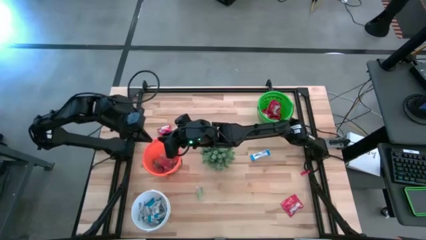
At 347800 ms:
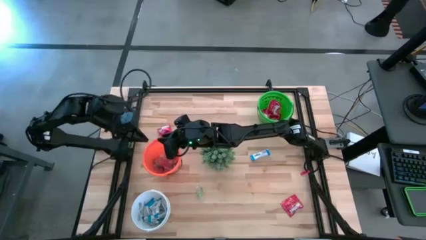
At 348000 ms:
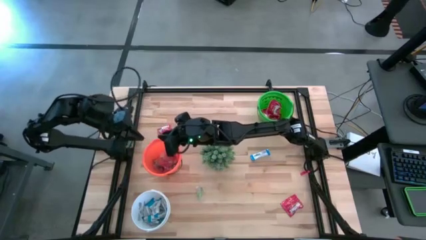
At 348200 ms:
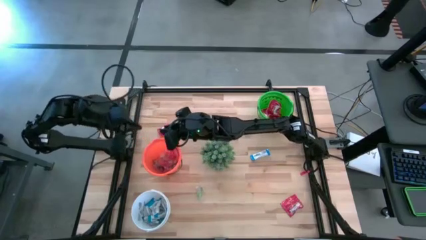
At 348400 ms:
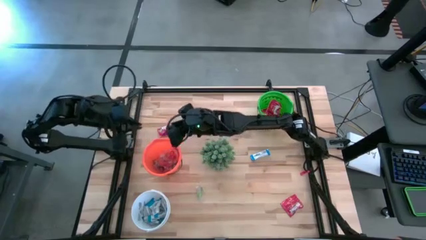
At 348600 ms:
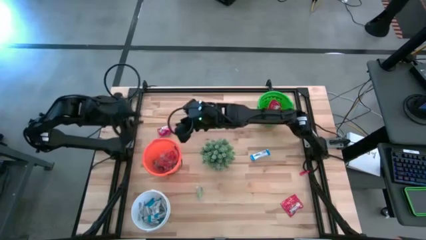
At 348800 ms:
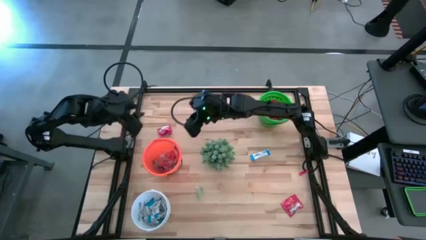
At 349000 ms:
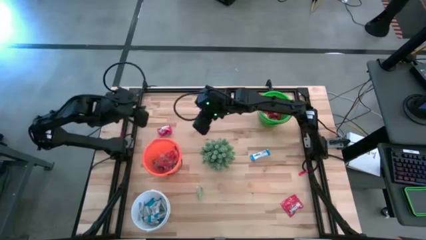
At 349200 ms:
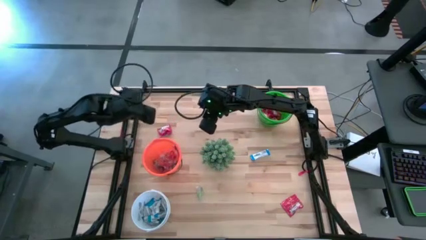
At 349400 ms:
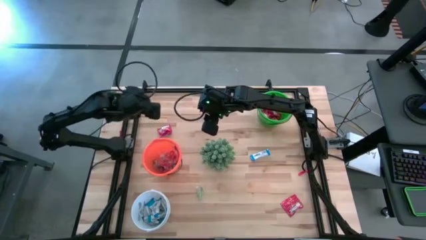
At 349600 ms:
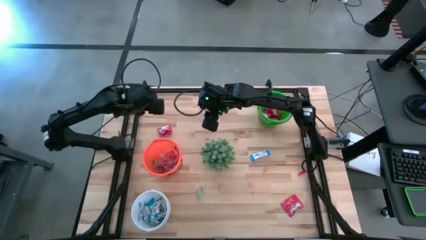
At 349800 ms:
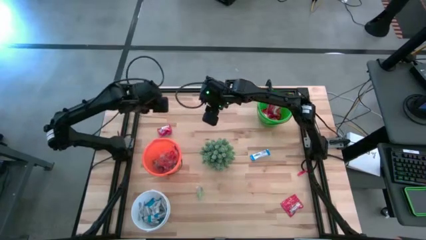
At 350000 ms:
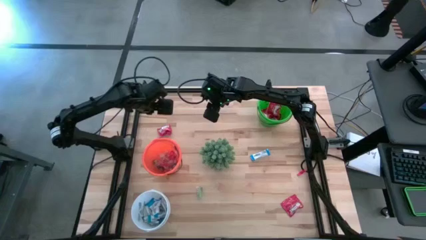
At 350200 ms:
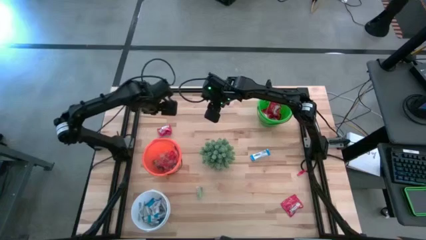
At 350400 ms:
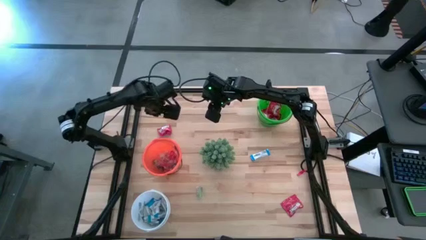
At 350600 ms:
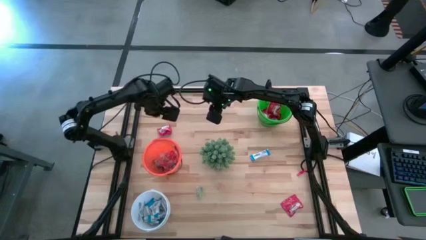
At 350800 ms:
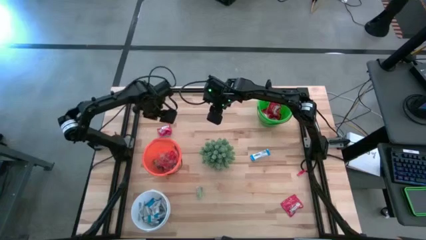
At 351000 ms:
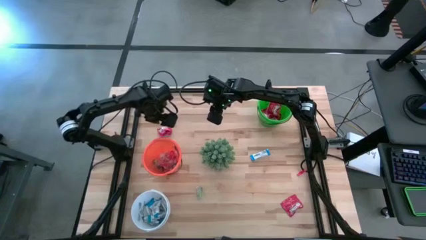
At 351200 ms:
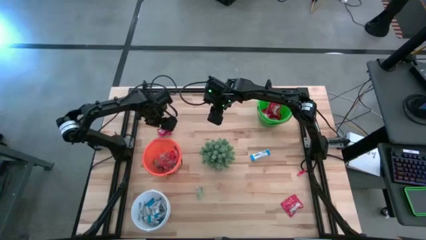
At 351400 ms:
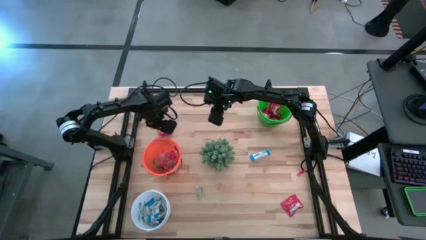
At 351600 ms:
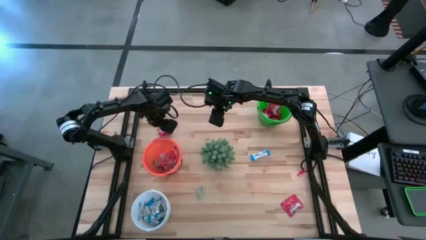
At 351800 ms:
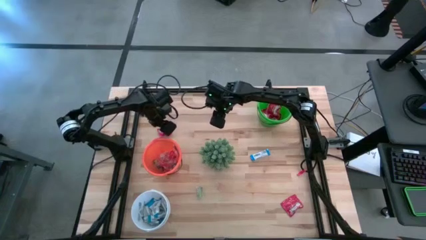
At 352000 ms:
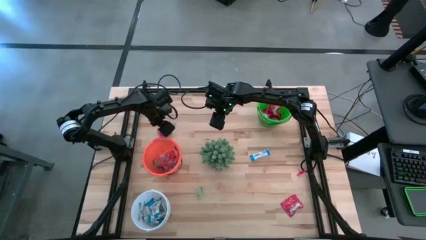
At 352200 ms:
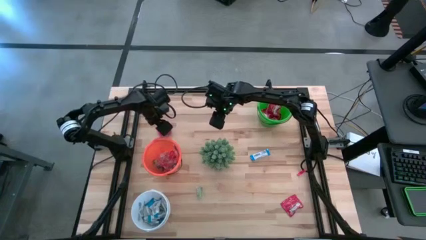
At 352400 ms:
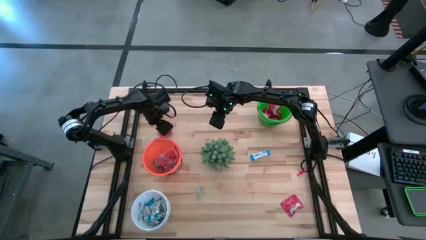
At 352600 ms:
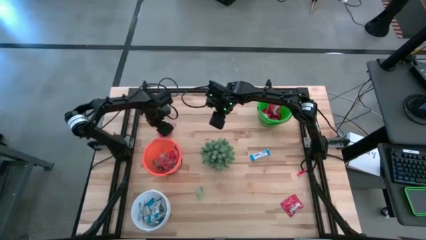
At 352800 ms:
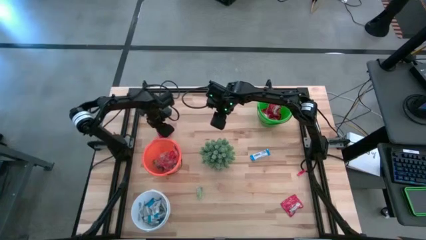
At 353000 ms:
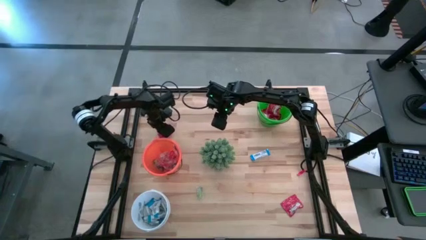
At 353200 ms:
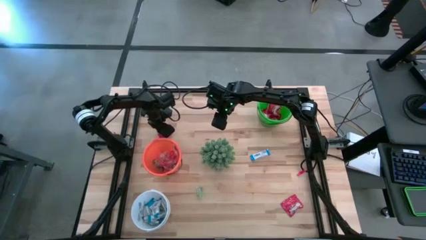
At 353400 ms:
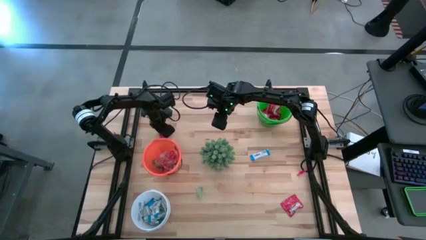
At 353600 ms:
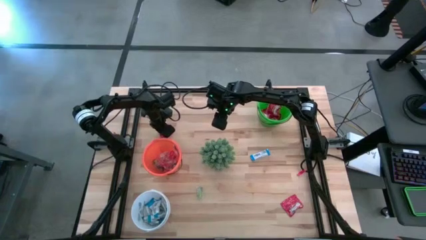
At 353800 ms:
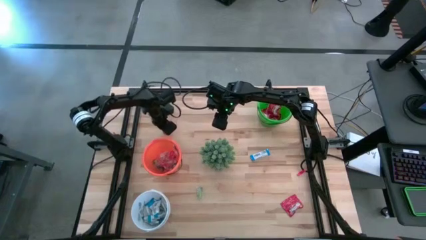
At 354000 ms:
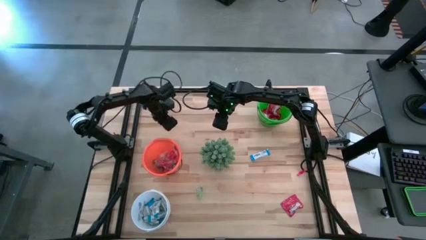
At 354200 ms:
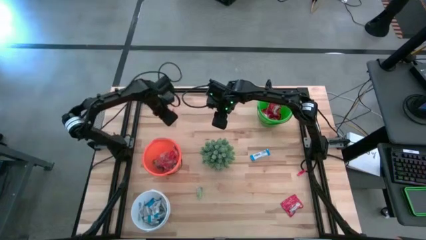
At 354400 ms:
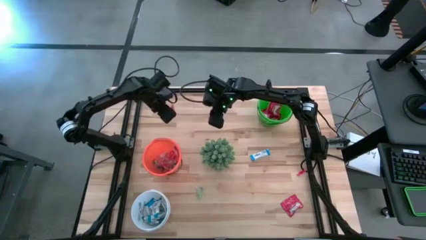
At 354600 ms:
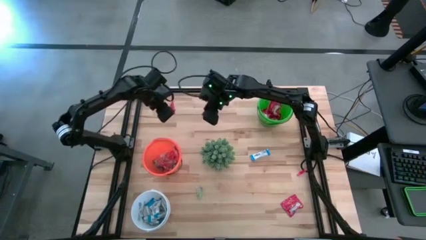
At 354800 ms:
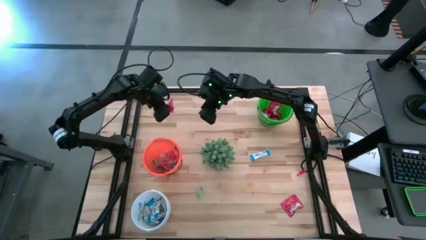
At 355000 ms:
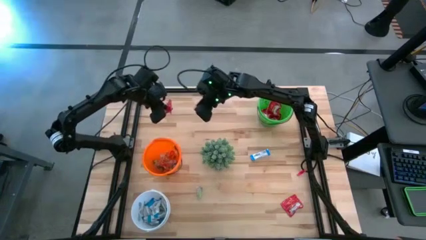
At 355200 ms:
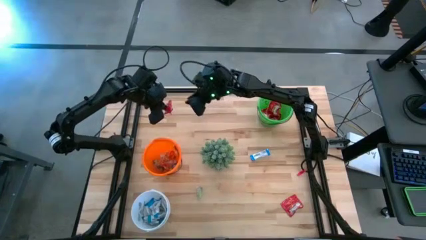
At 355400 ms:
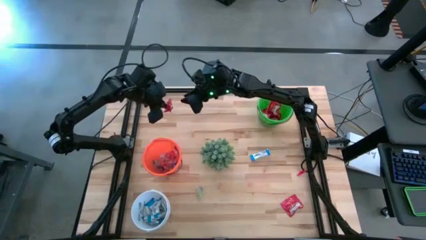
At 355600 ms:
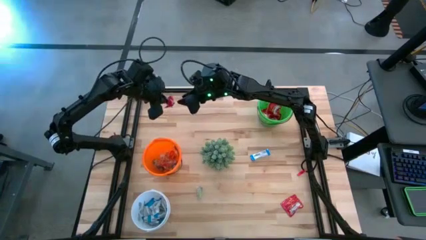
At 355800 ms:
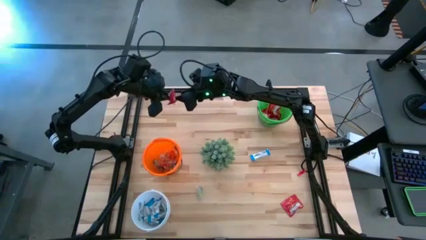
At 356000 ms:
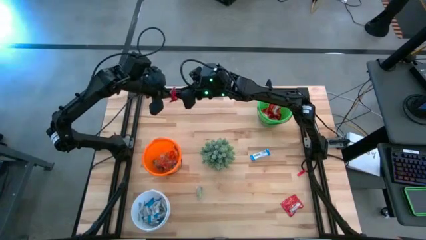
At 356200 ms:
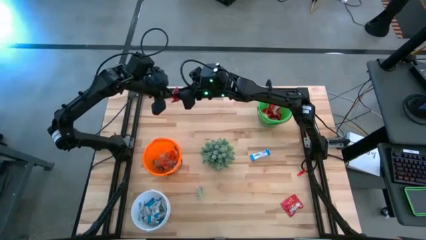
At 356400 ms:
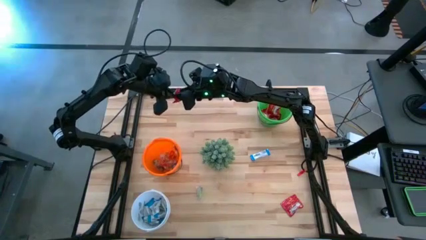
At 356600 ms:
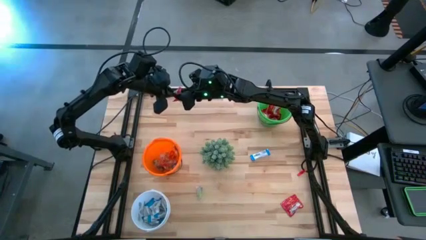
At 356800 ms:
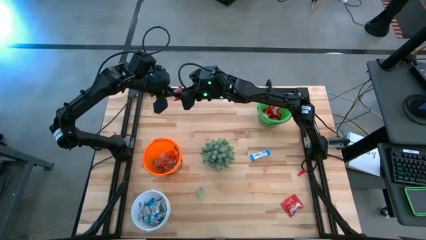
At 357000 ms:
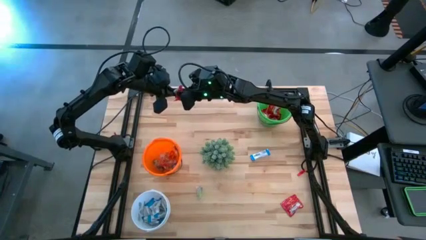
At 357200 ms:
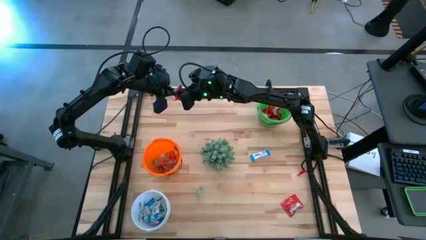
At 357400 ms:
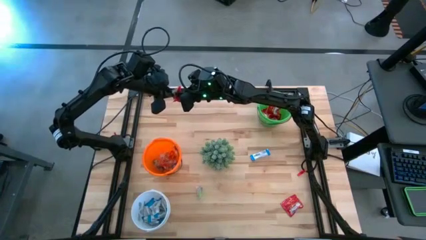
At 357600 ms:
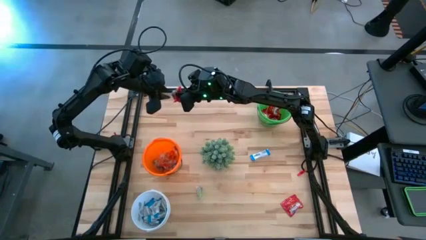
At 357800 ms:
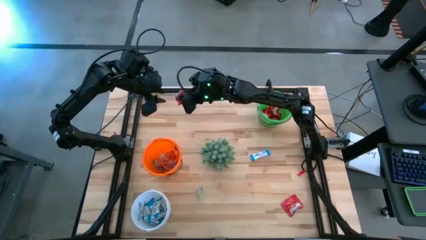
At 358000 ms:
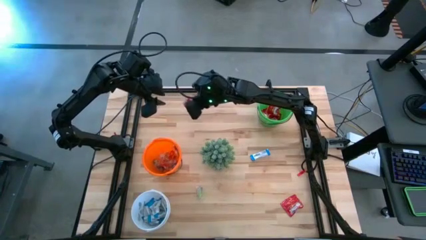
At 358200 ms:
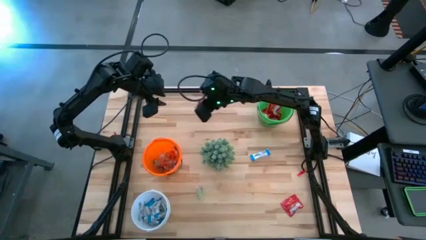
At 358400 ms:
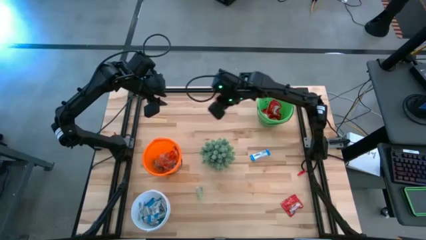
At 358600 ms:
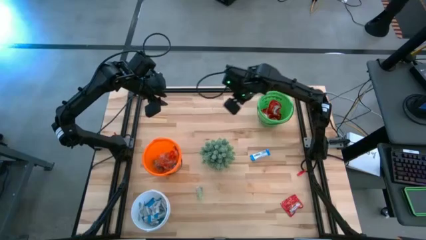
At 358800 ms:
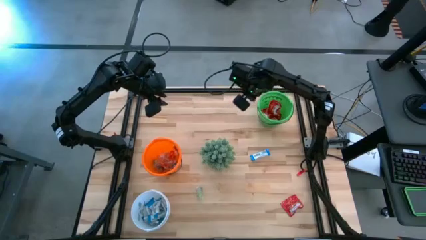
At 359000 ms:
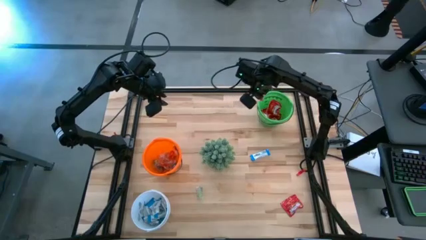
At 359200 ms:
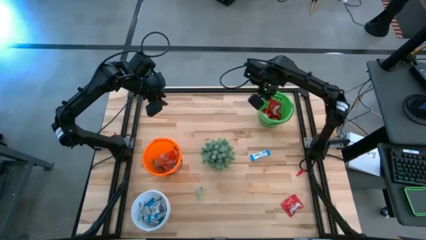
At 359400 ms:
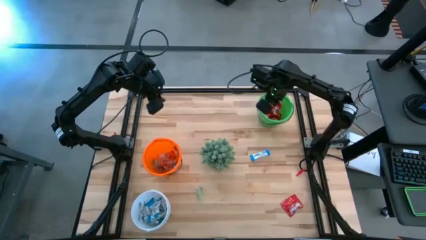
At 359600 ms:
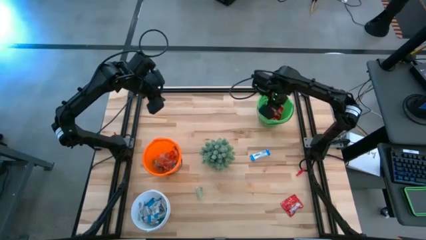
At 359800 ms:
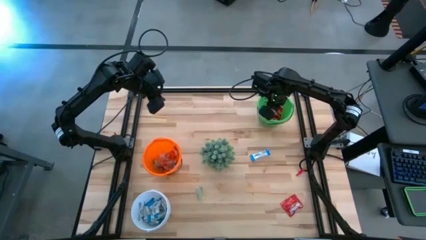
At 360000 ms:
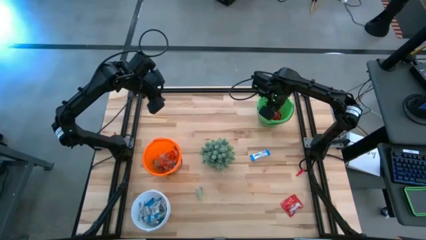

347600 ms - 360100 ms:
Task: Sort candy
Put the red candy into the green bucket

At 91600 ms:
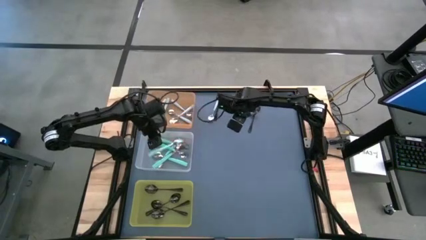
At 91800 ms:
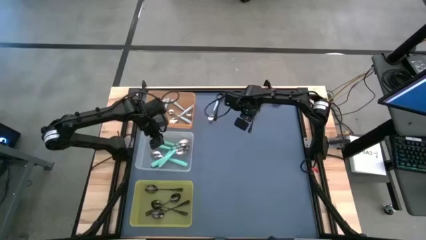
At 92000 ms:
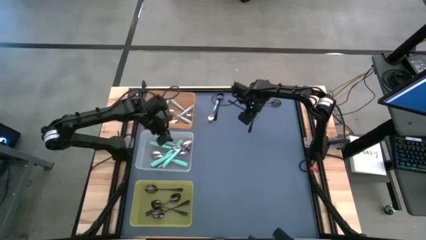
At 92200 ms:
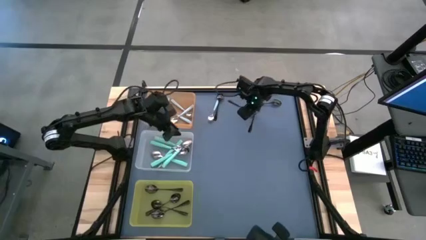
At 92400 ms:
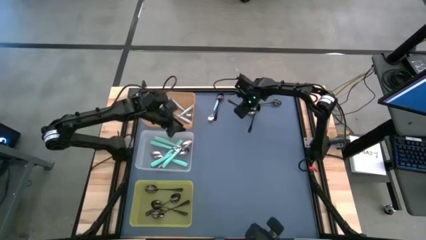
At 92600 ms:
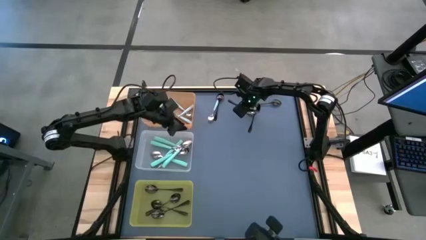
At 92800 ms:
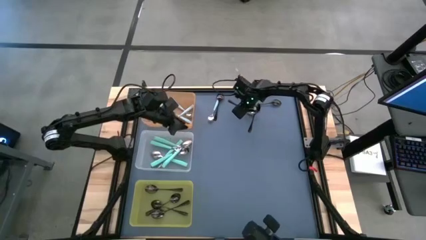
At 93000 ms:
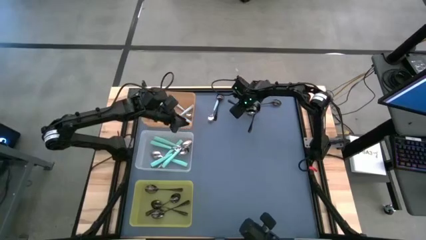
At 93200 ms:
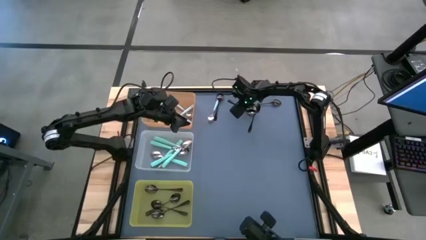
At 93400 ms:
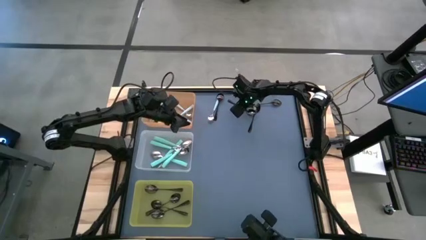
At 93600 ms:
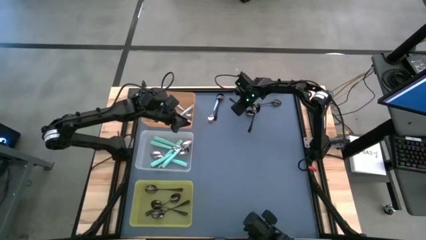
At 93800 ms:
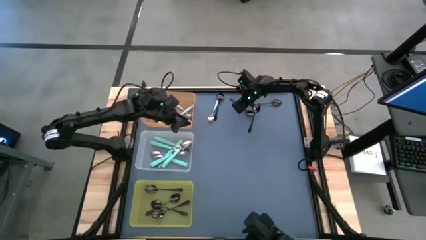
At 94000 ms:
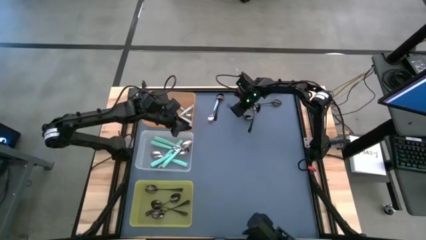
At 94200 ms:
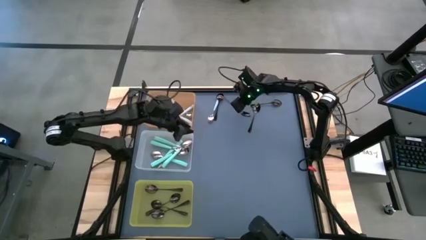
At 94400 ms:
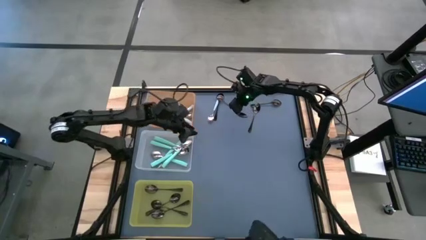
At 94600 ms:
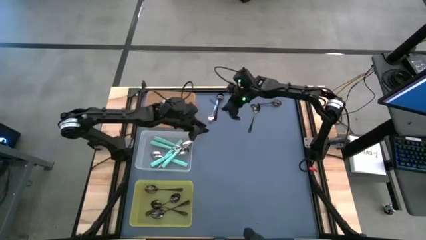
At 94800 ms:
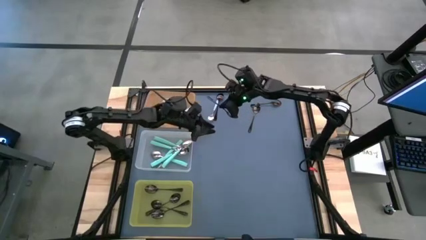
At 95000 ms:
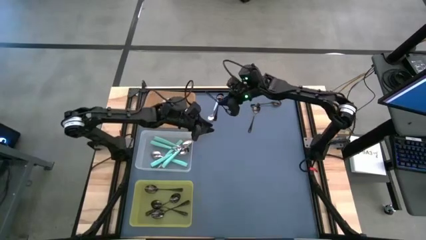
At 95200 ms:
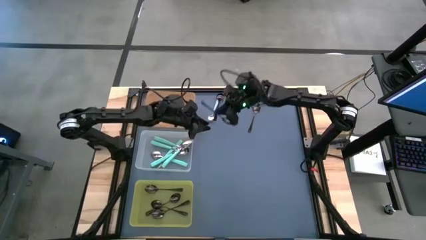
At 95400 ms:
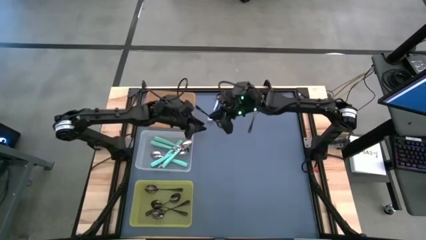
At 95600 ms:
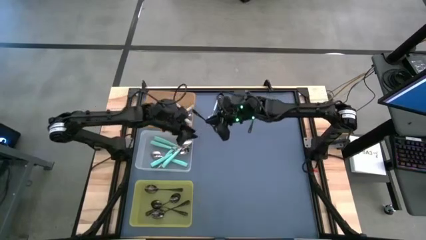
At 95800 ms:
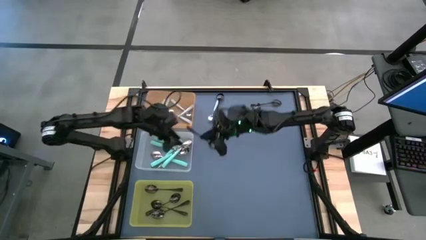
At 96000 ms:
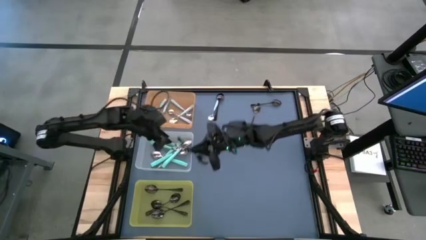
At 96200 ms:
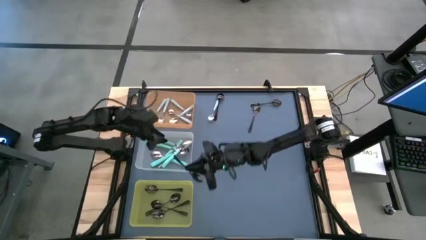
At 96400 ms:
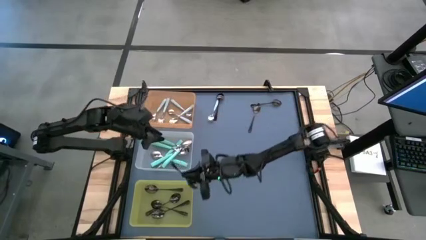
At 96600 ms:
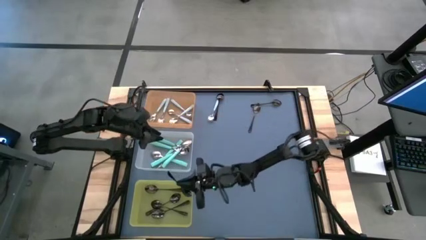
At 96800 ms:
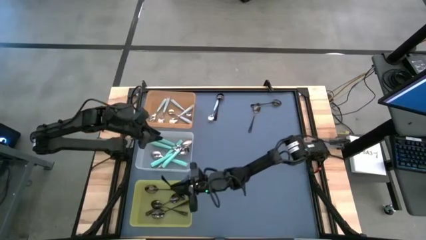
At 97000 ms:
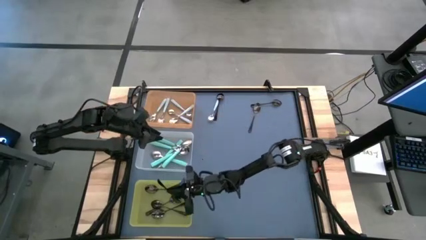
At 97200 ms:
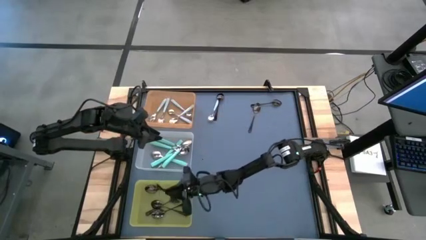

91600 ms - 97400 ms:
Task: Sort silverware by color (type)
Put the black spoon into the yellow bin
